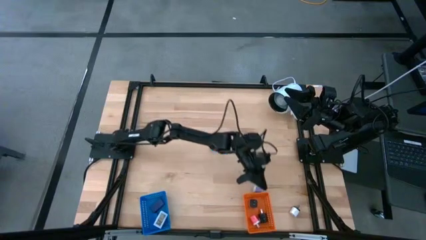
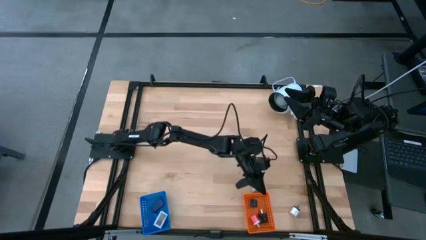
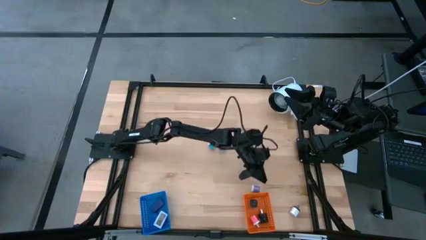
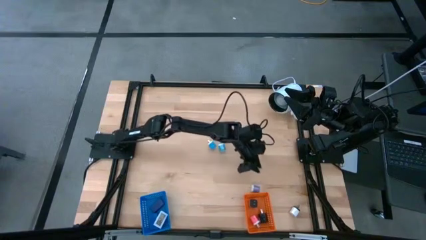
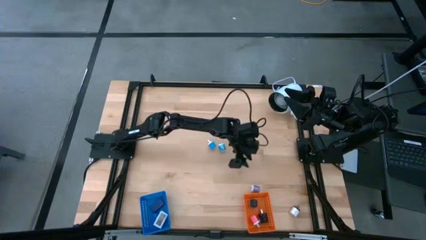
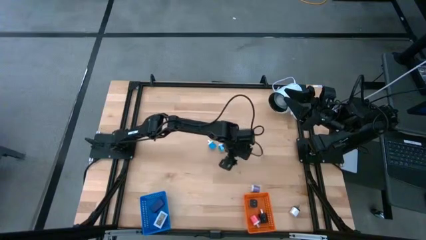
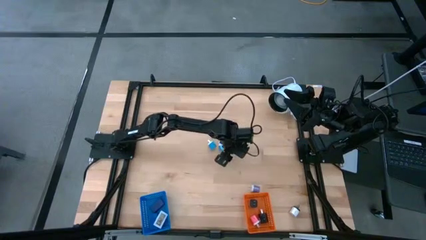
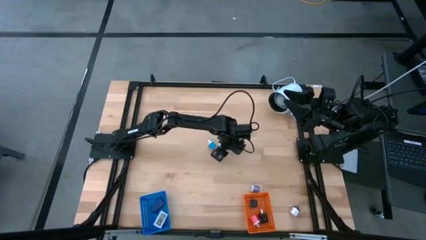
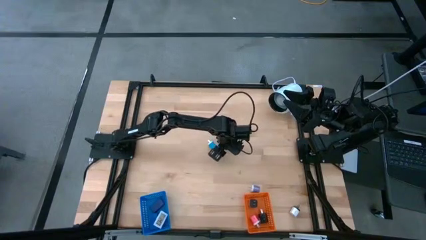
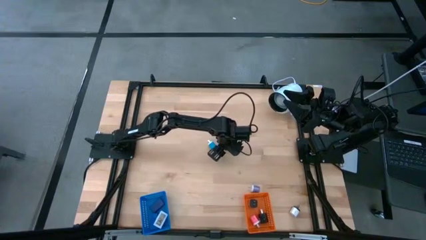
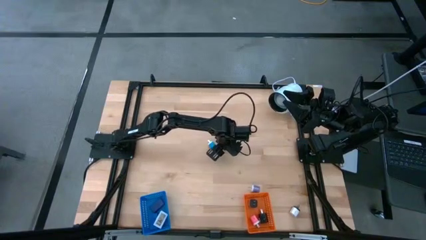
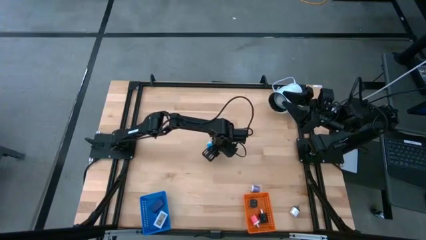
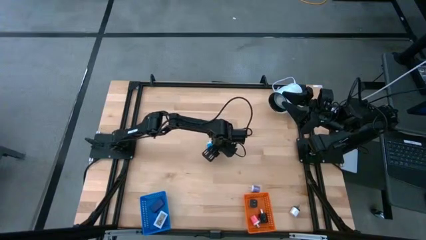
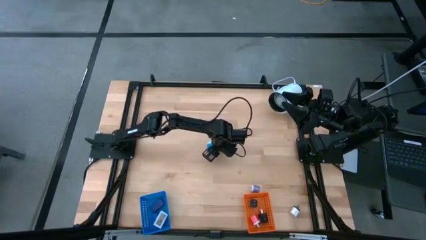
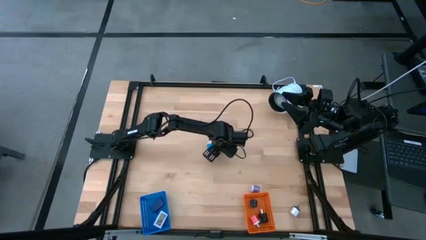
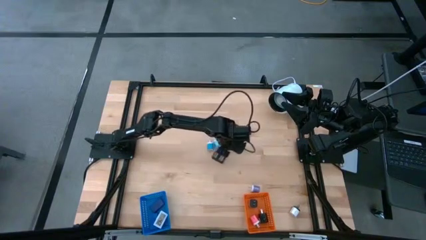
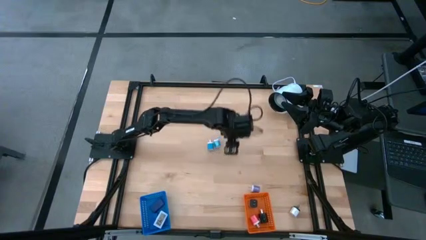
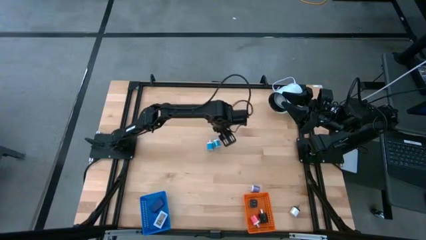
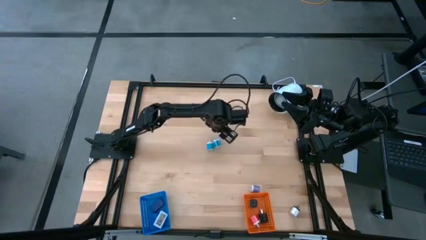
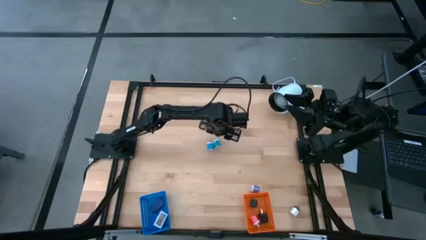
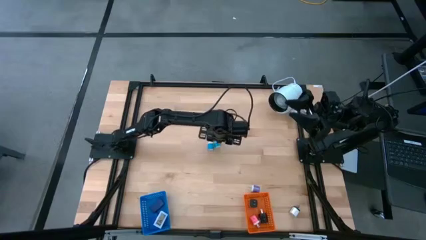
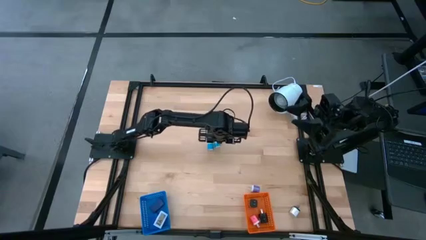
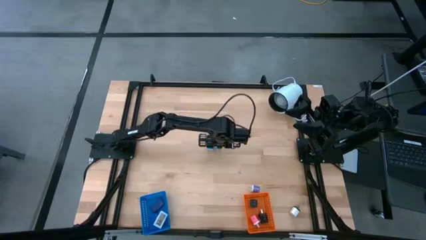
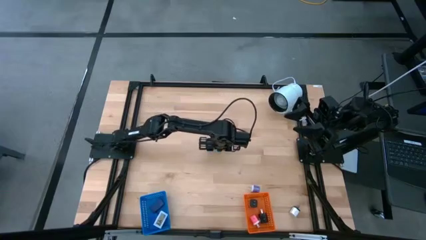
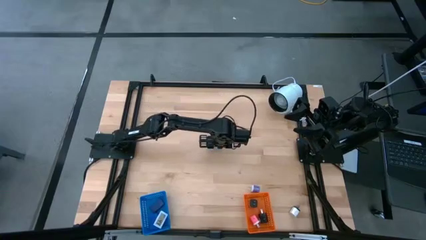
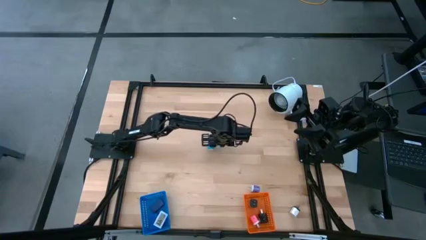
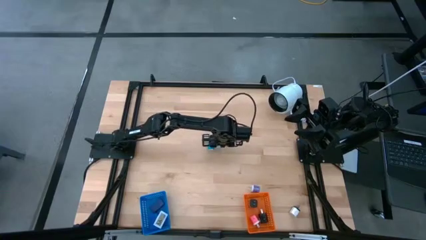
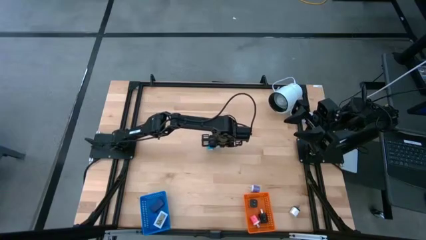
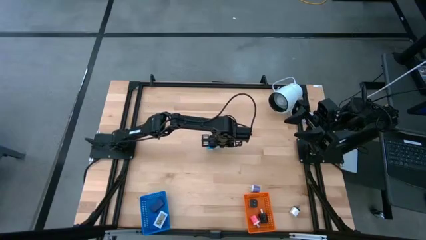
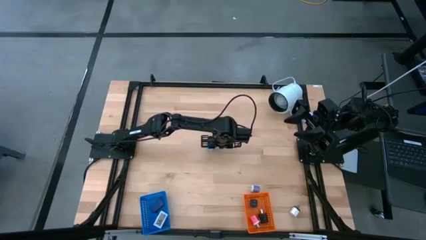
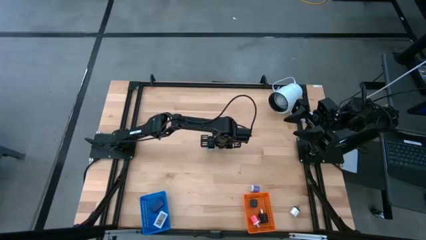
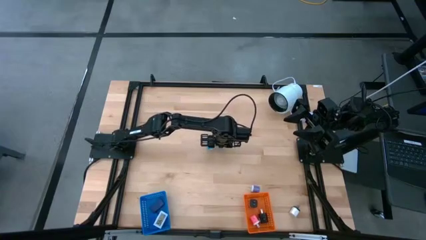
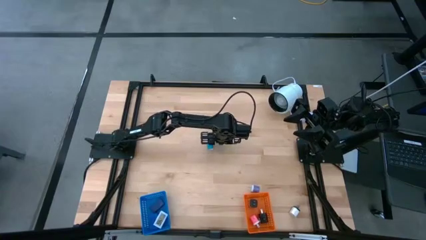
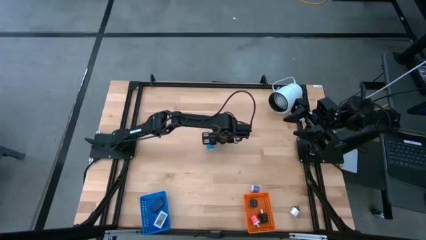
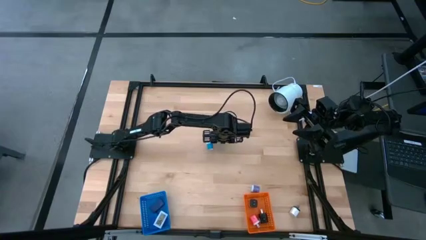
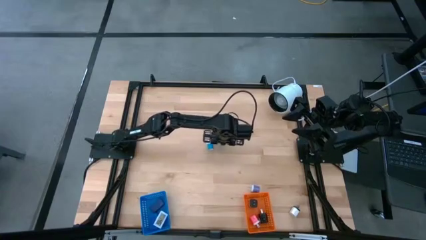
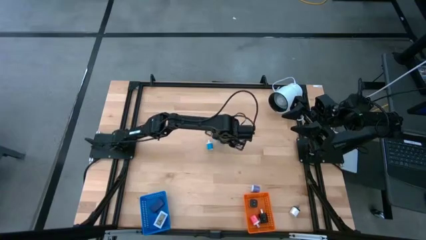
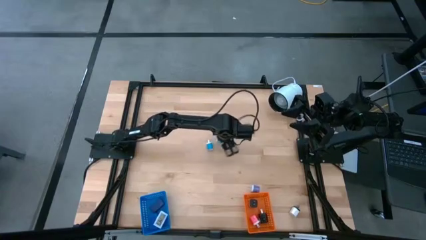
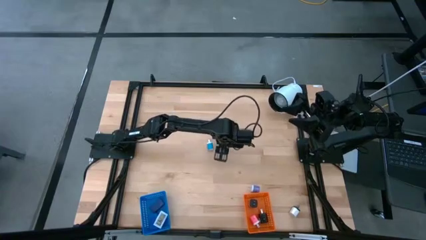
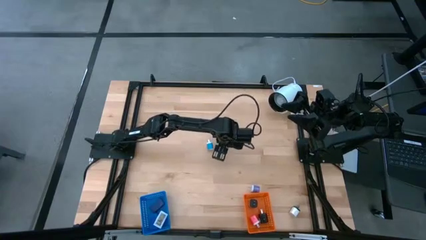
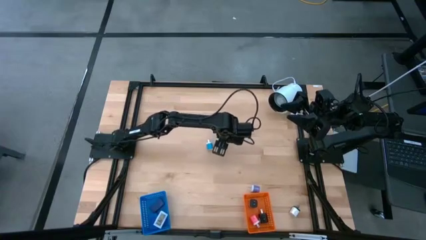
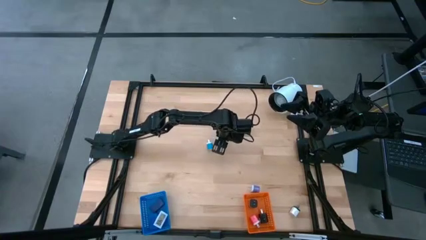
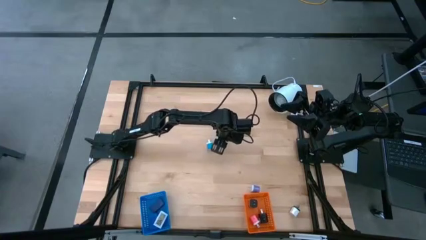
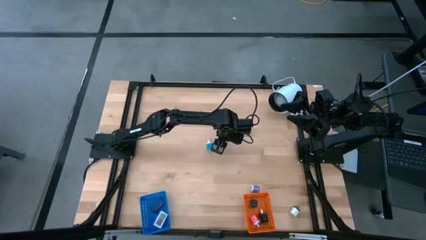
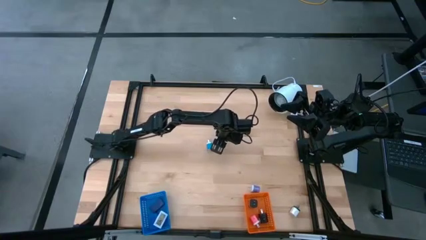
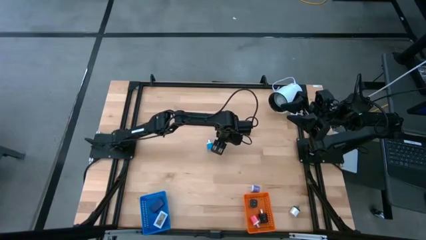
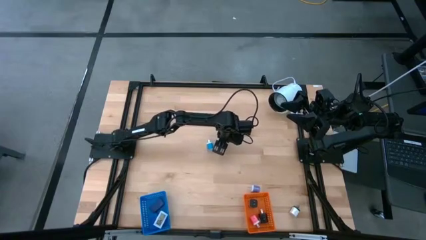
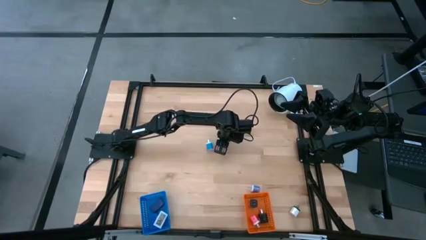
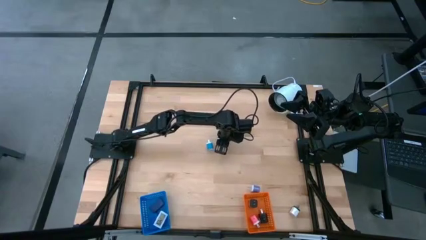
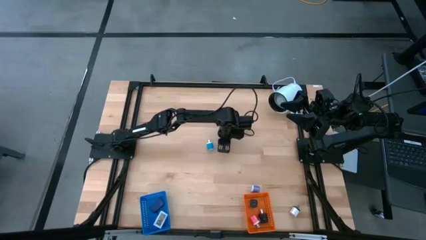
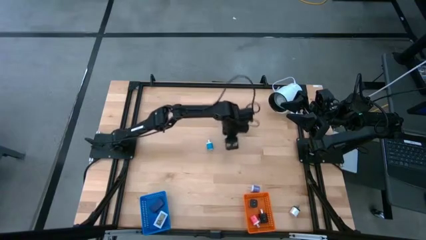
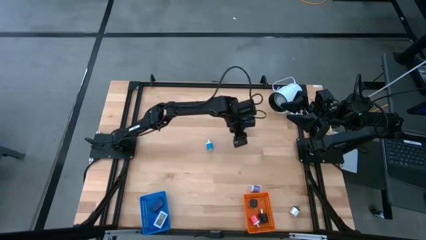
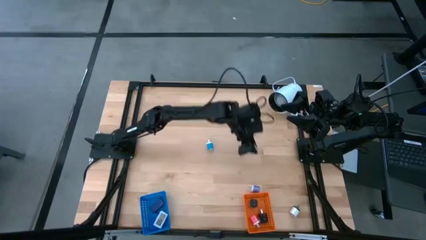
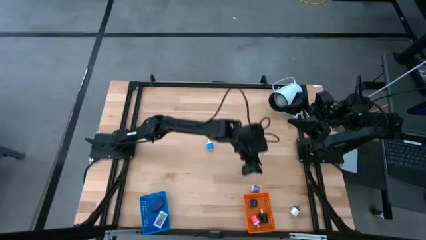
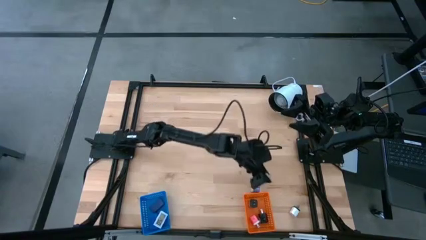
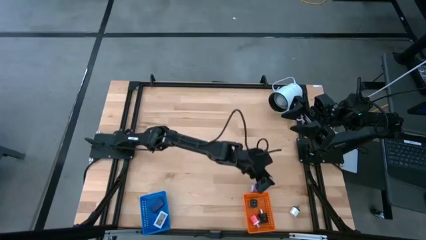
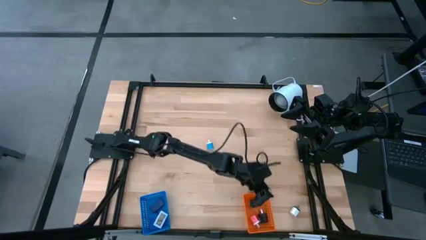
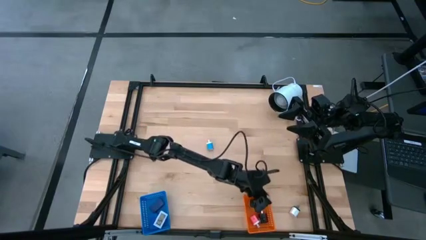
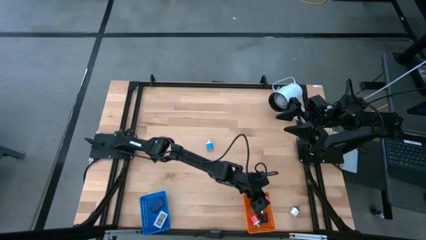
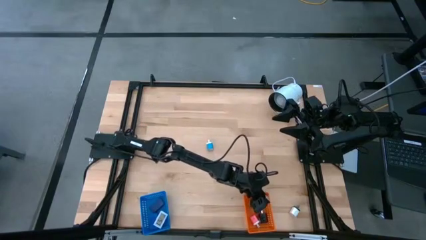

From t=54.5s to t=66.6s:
Task: Pick & Place Office items
Put the right blue charger adapter into the orange bin

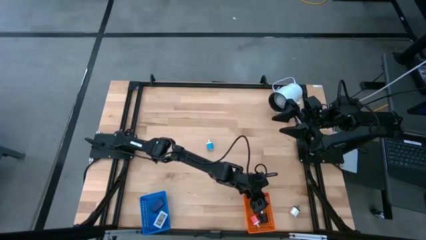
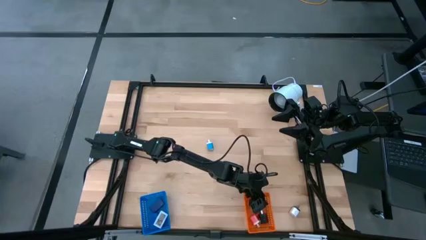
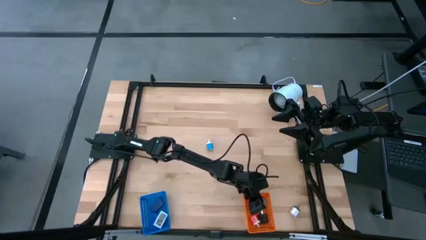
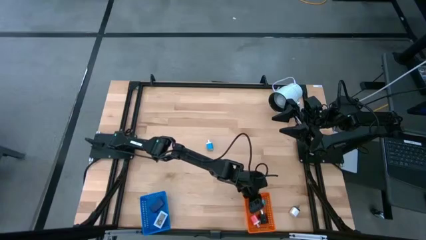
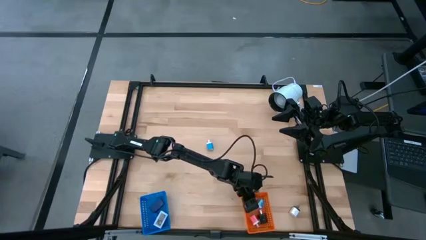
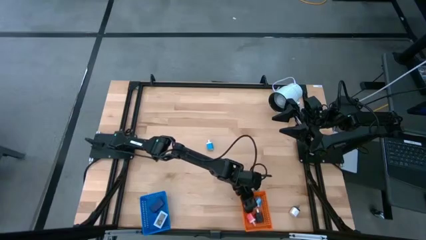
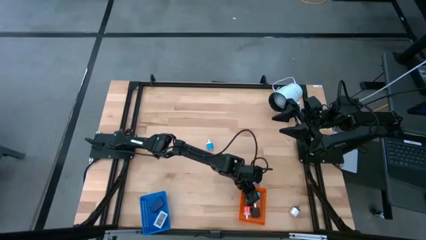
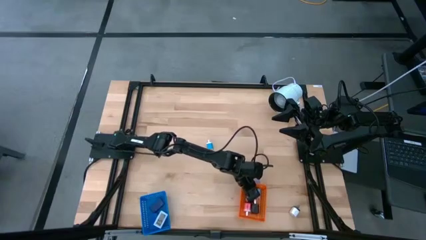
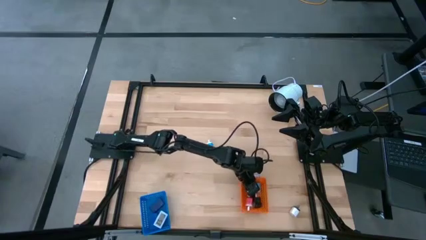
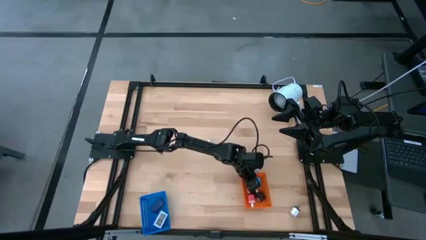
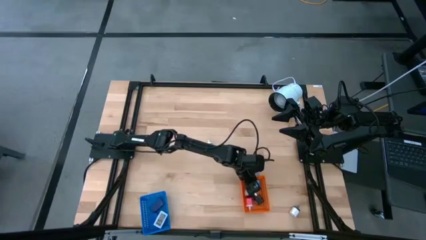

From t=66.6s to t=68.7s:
Adjust the orange bin

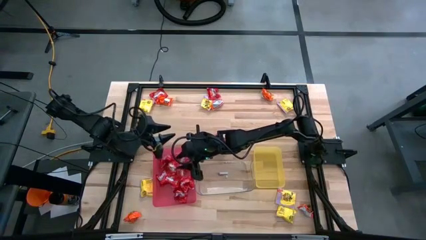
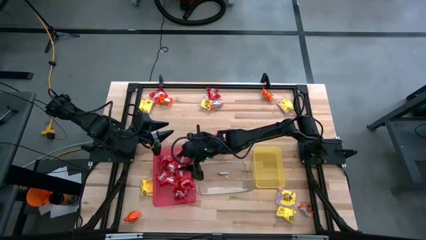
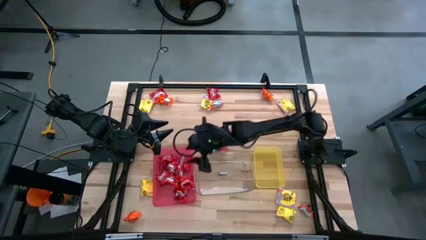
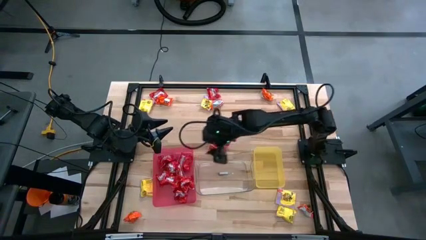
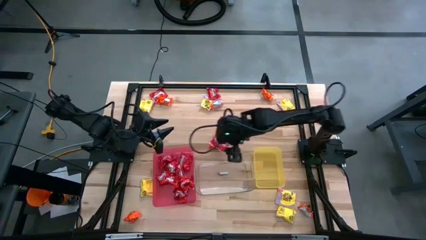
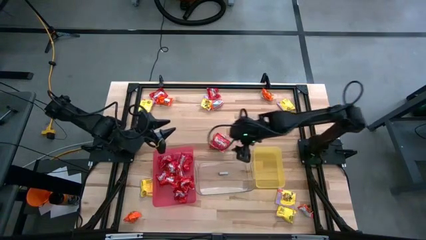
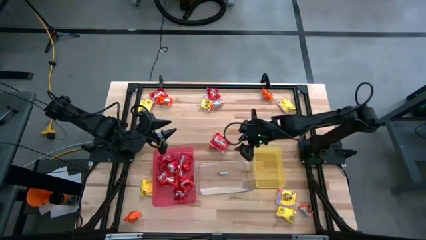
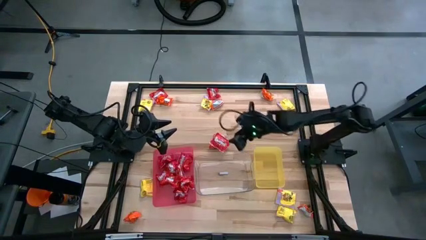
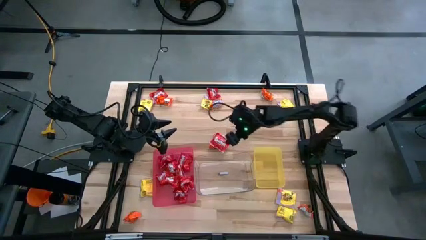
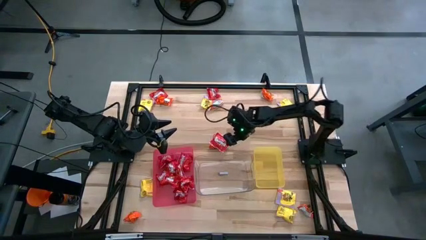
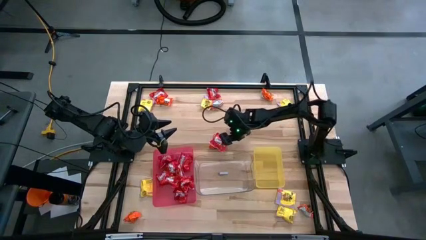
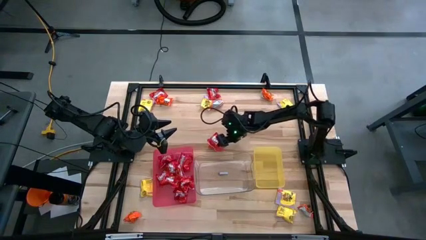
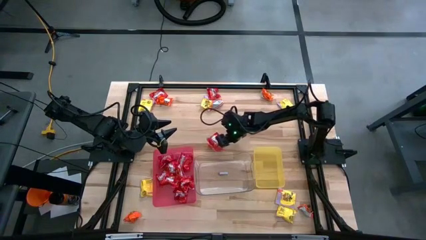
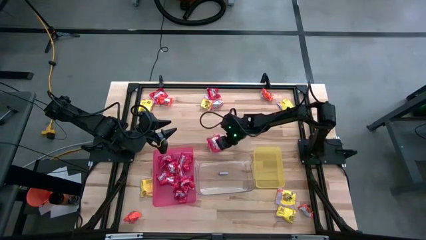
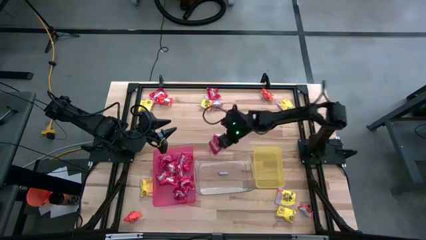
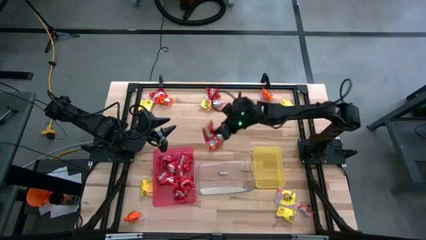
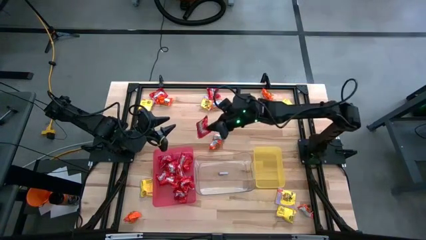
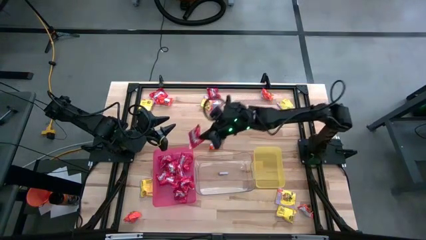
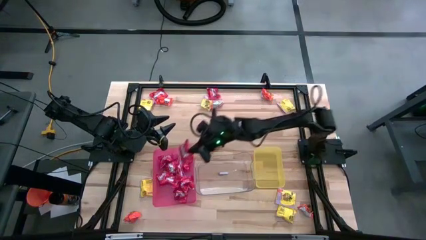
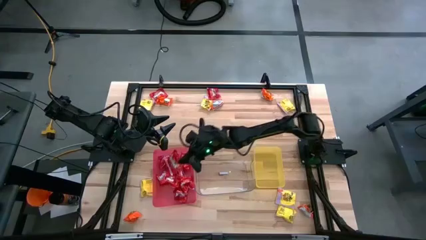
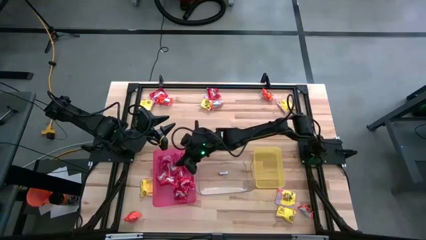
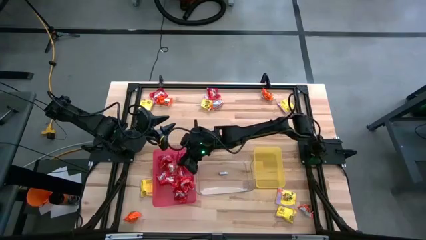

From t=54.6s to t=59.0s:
Task: Sort candy
Put the red candy into the red bin
